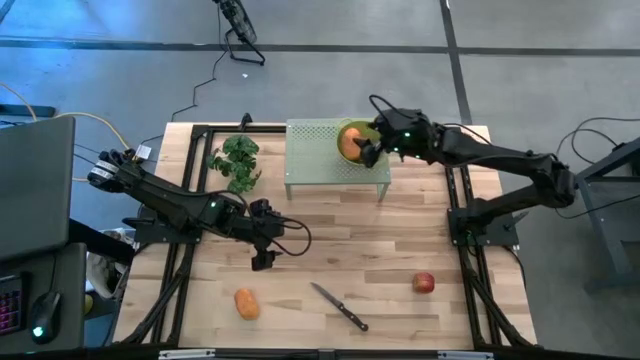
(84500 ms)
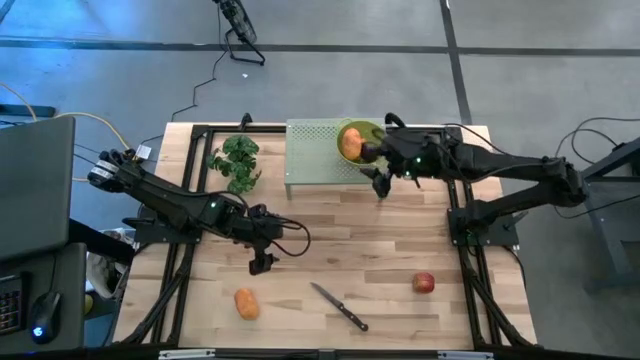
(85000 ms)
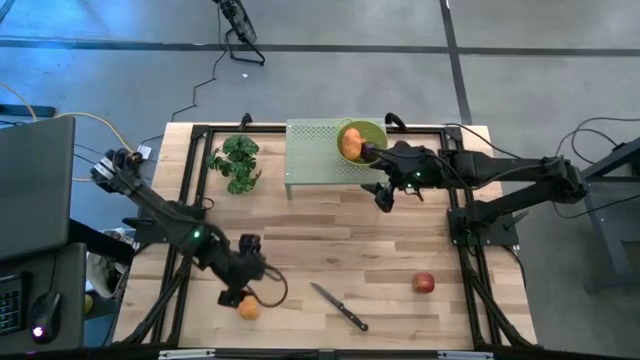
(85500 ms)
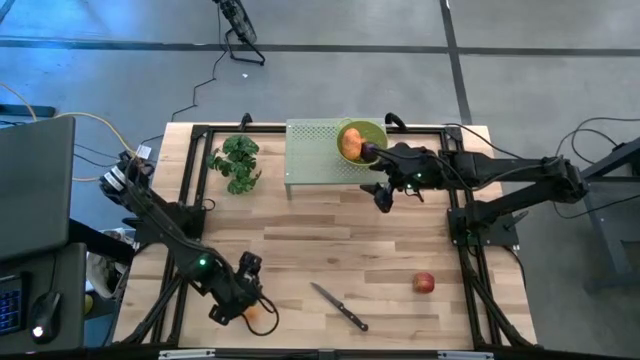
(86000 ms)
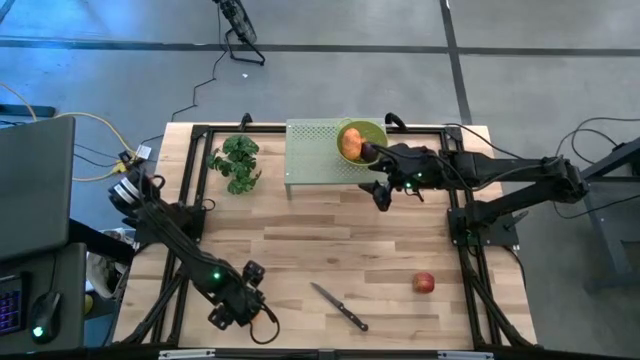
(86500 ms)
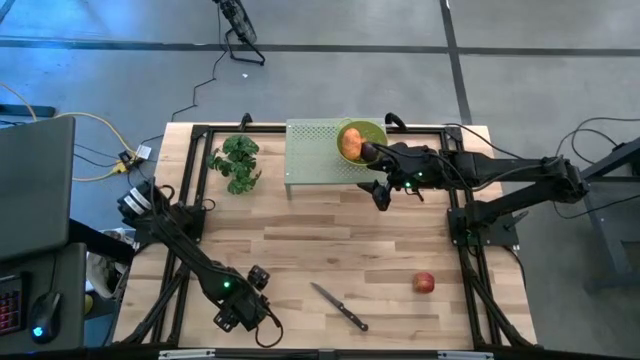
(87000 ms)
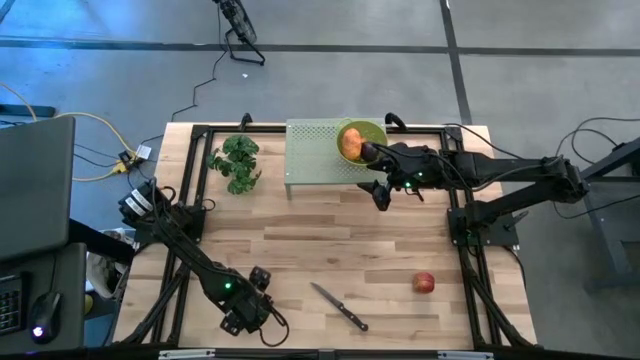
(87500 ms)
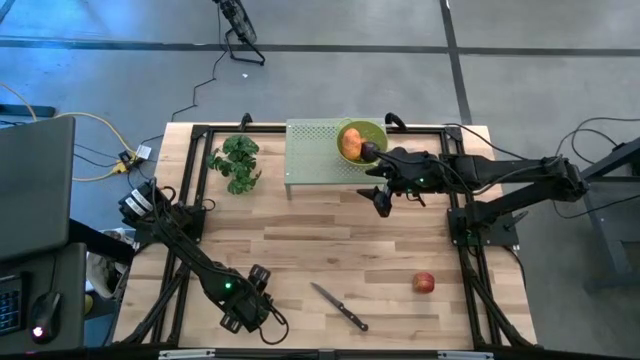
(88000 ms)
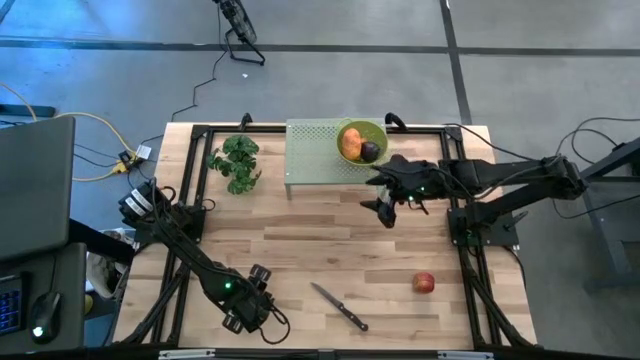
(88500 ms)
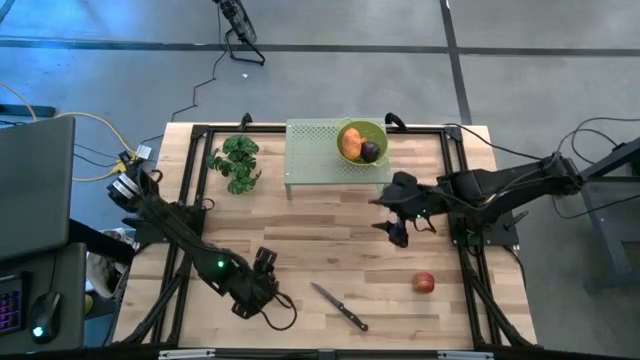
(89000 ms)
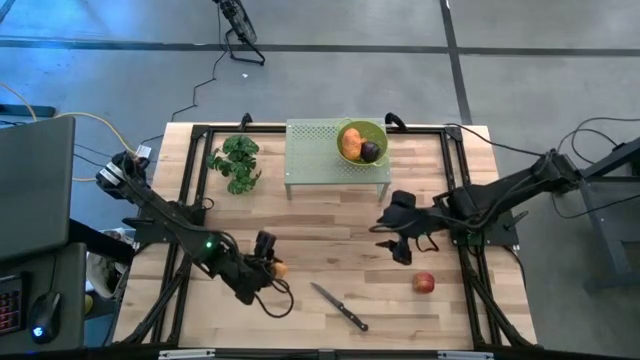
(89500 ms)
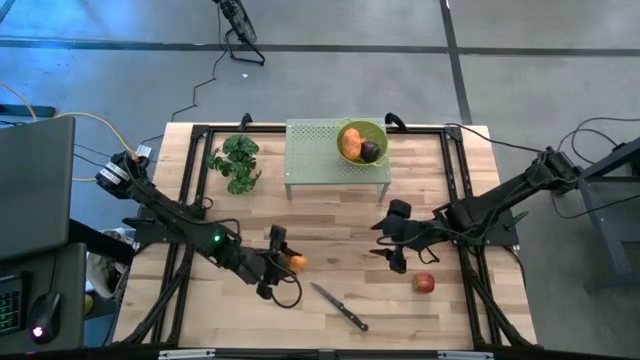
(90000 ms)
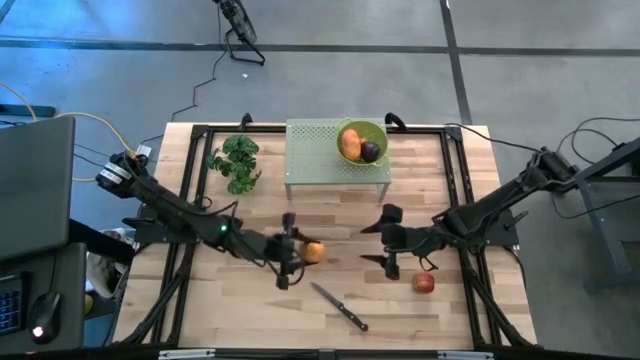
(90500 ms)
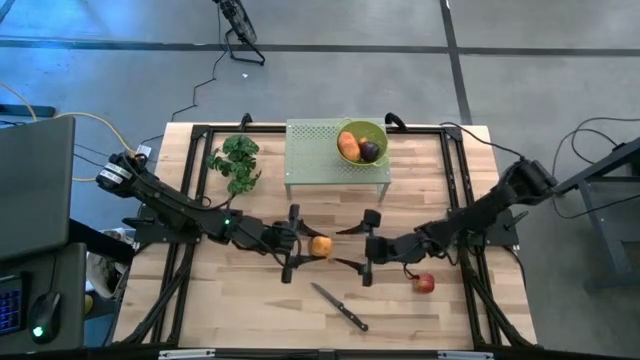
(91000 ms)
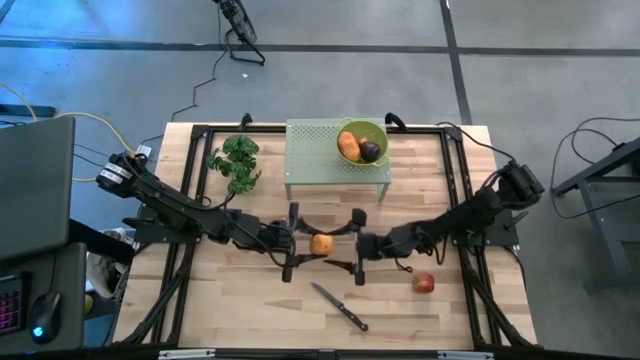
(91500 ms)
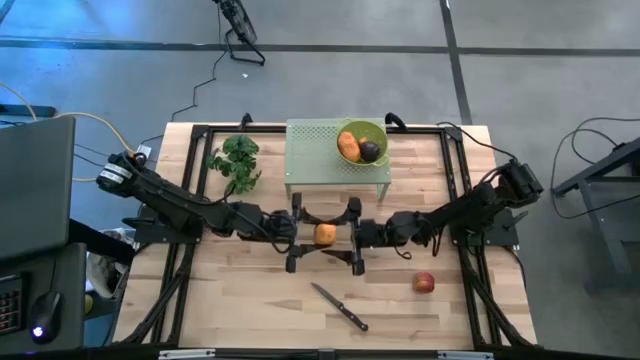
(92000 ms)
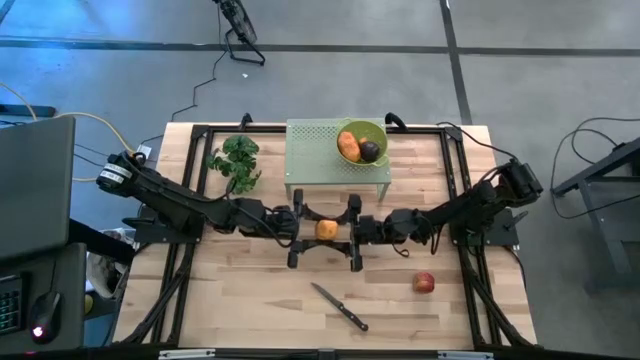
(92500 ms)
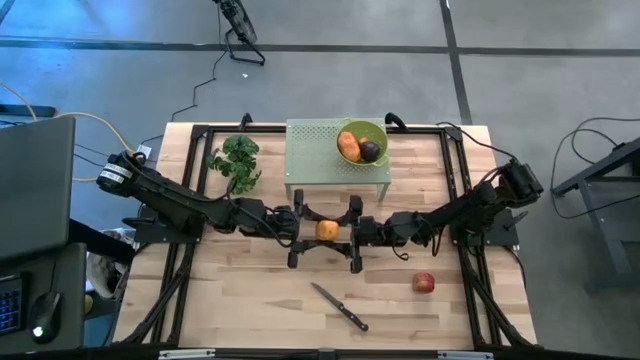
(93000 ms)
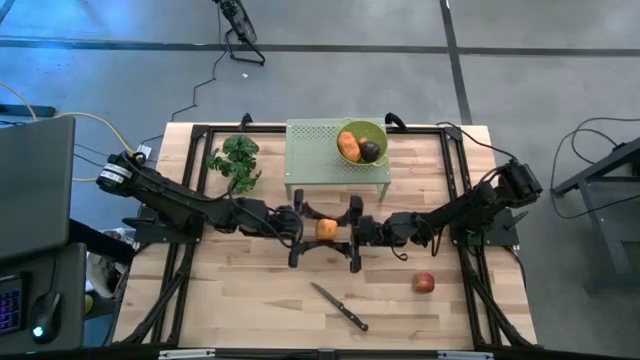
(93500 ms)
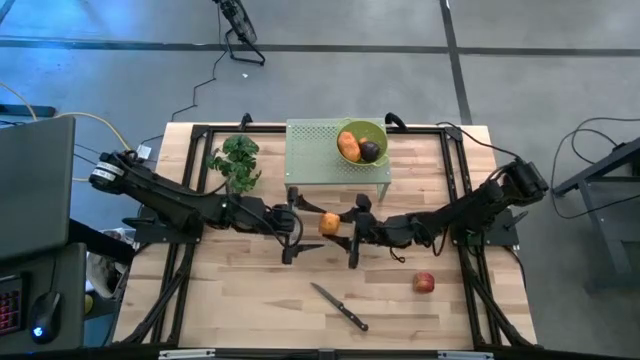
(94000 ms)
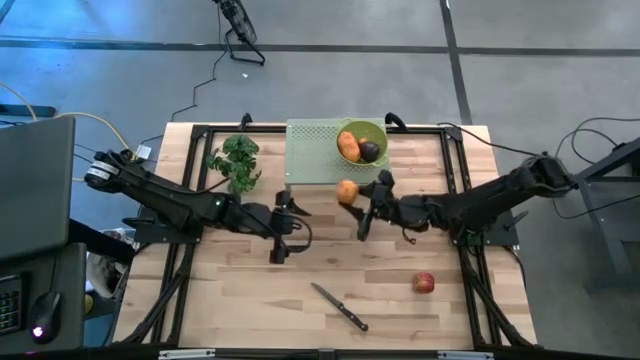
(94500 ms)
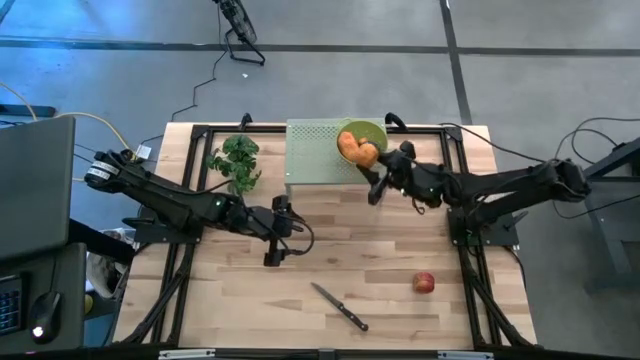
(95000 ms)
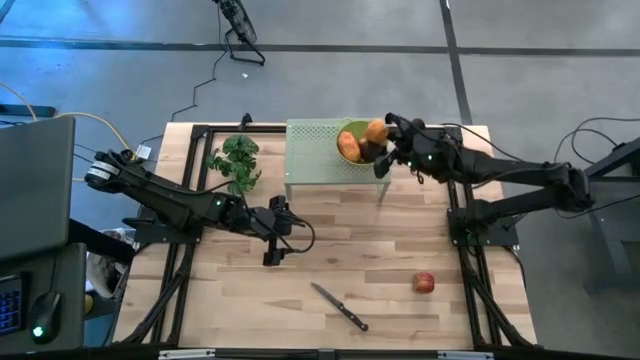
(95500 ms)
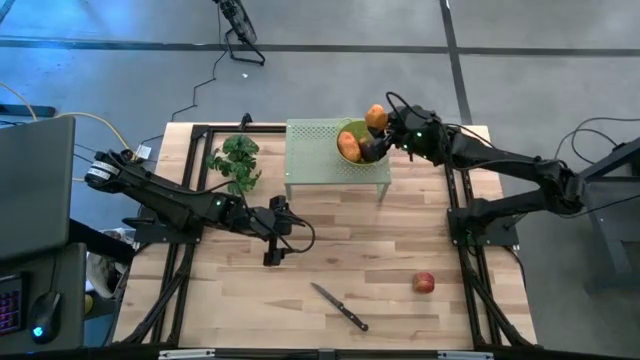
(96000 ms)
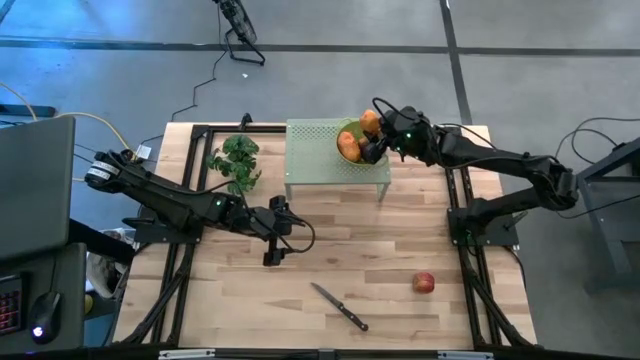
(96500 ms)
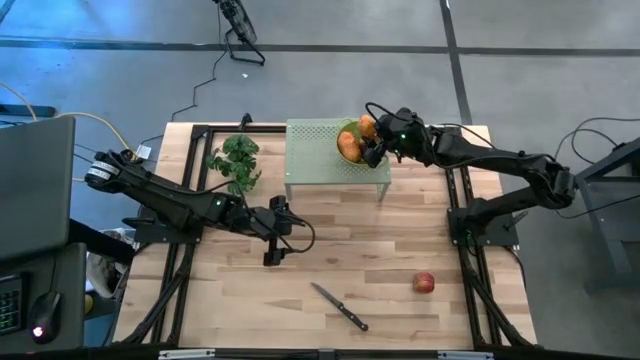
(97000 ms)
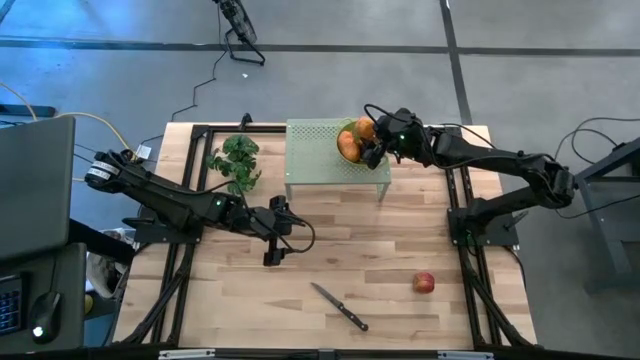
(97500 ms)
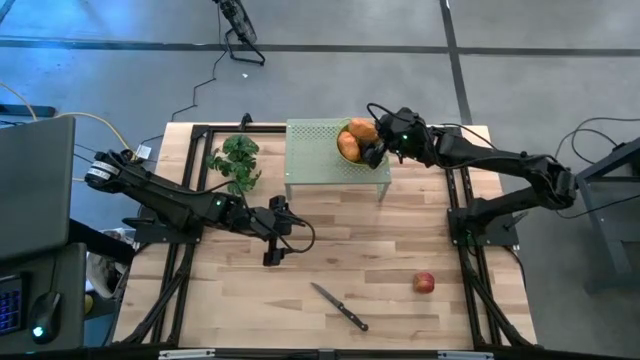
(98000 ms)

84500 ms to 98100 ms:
Task: Pick & Place Fruit
Put the potato into the green strainer bowl on the top shelf

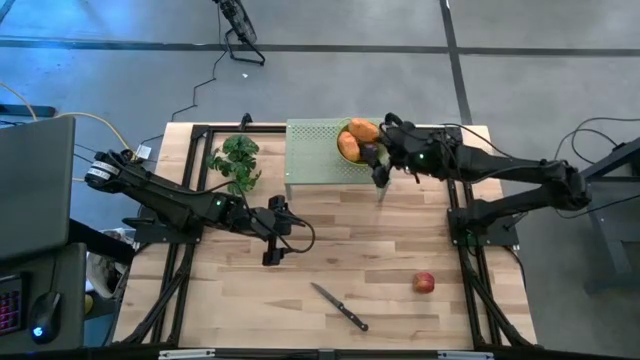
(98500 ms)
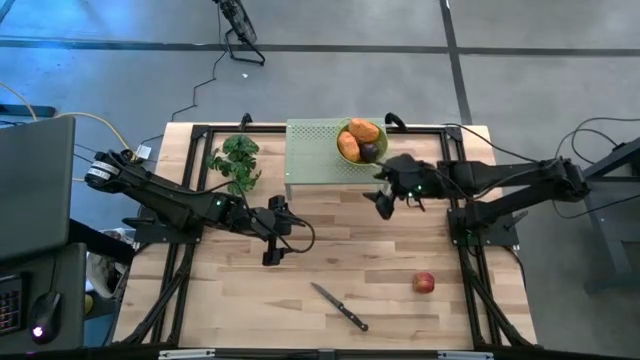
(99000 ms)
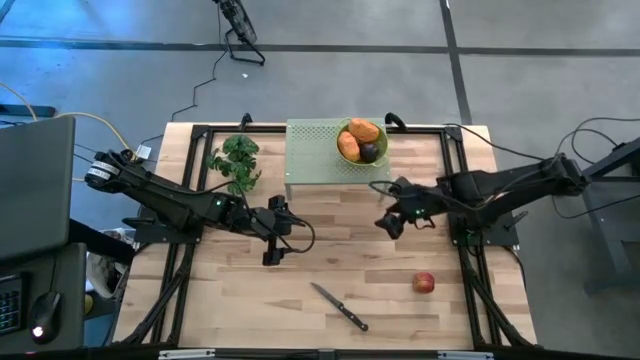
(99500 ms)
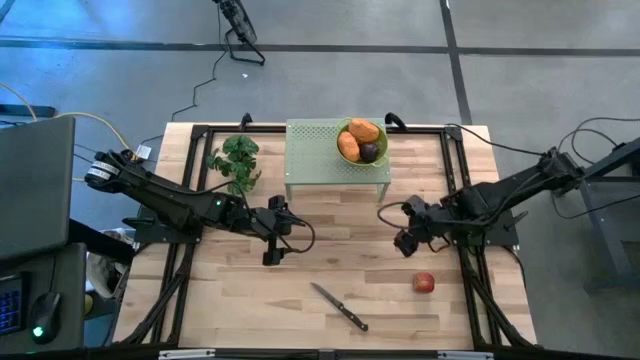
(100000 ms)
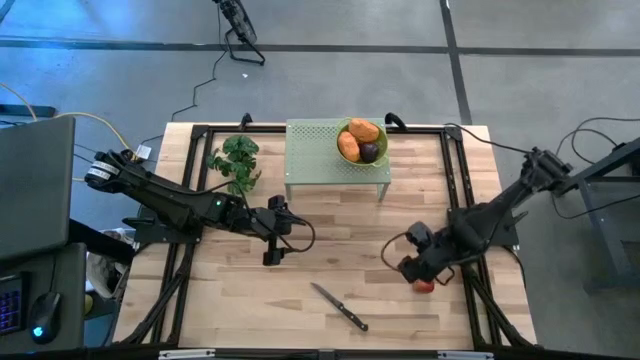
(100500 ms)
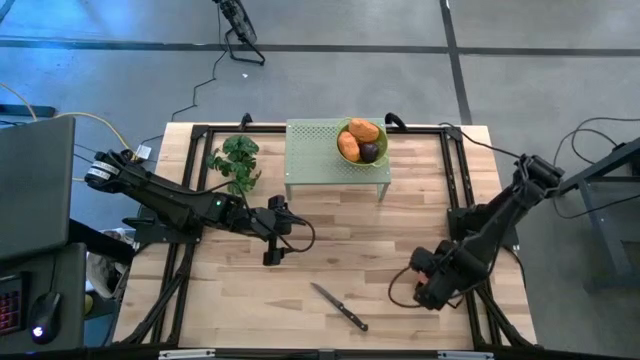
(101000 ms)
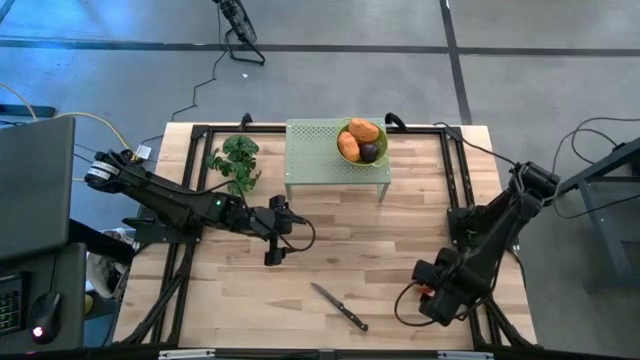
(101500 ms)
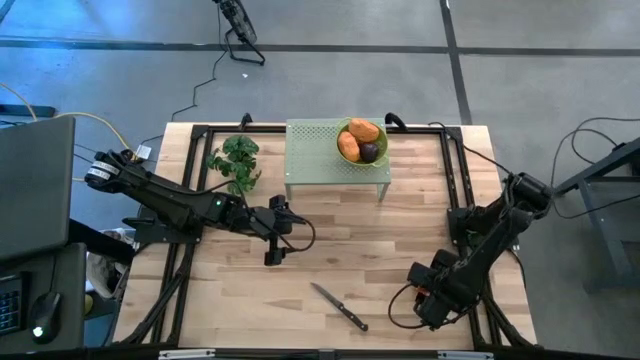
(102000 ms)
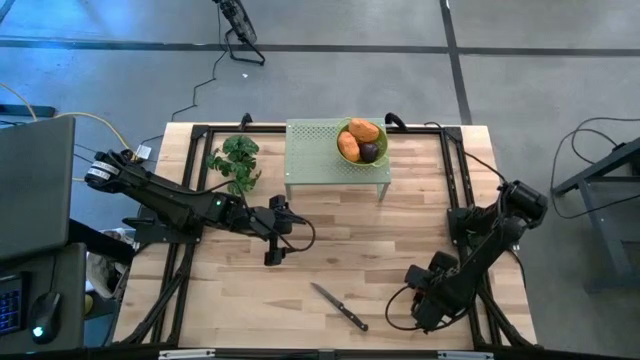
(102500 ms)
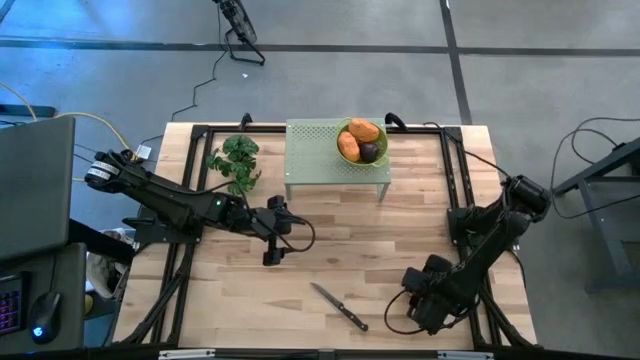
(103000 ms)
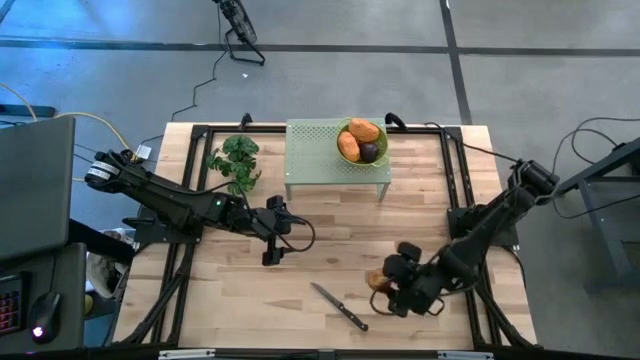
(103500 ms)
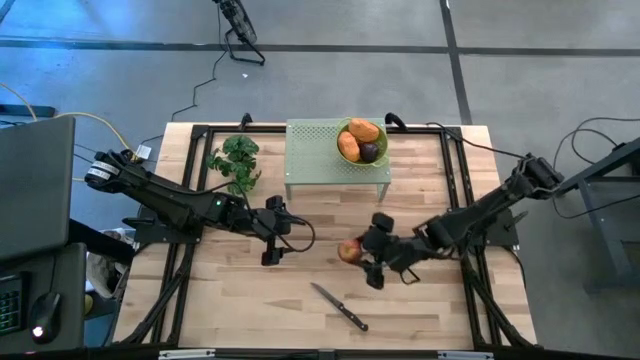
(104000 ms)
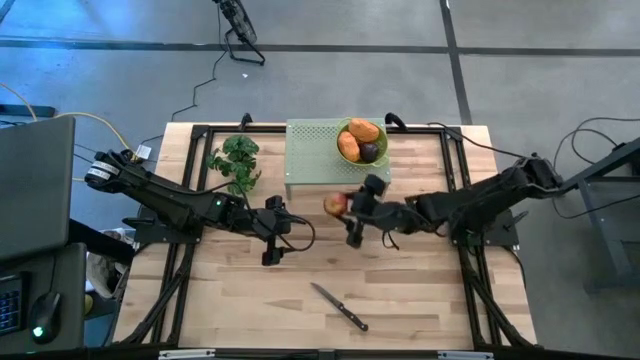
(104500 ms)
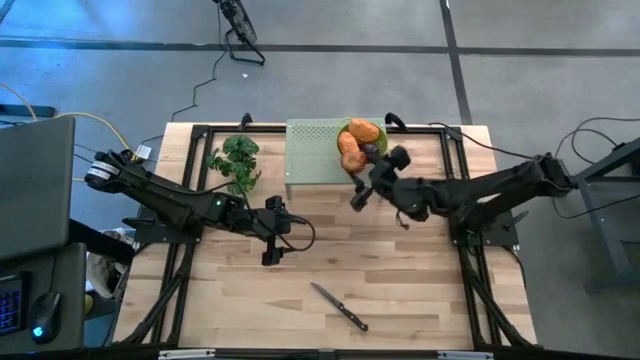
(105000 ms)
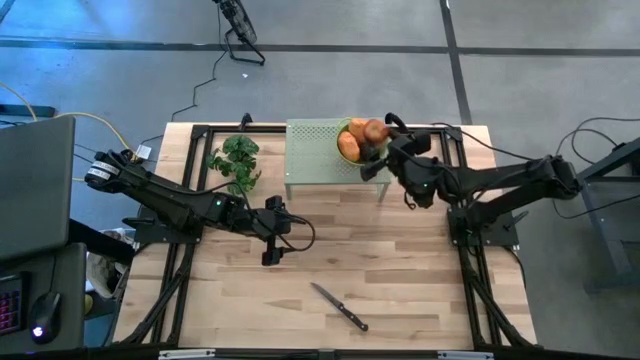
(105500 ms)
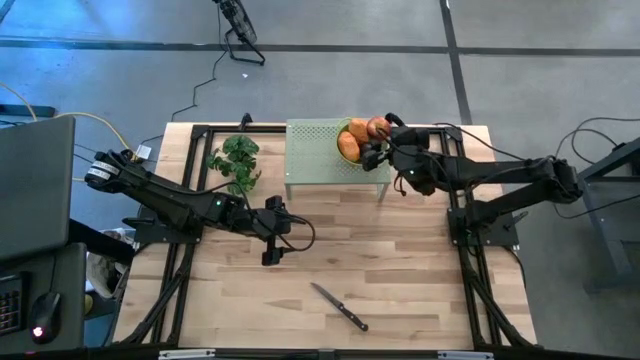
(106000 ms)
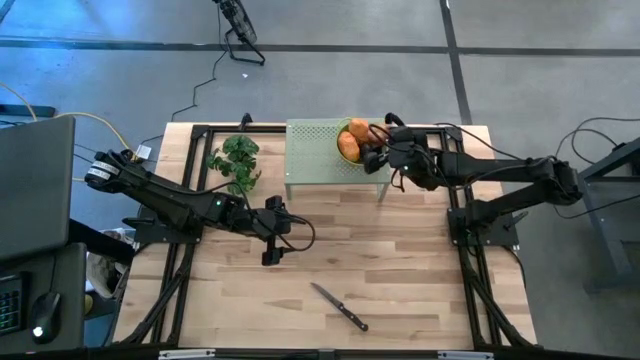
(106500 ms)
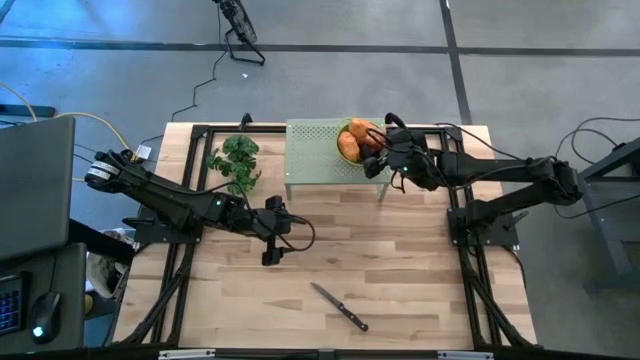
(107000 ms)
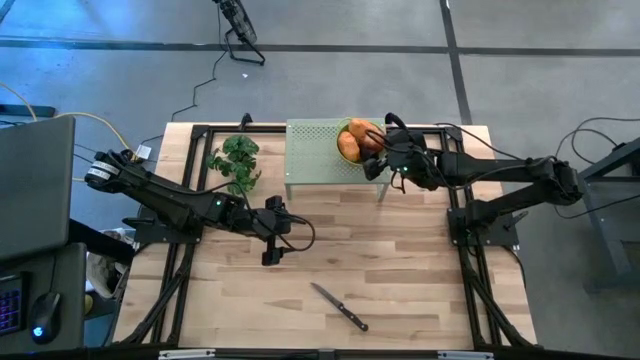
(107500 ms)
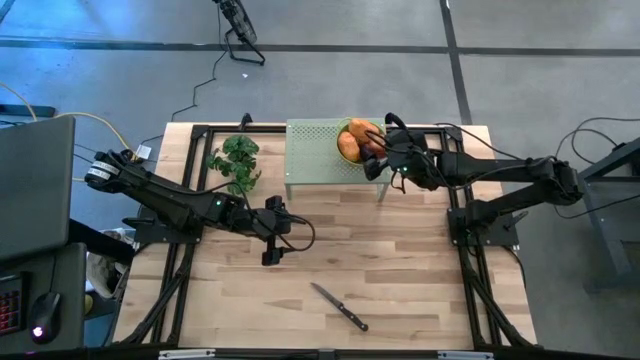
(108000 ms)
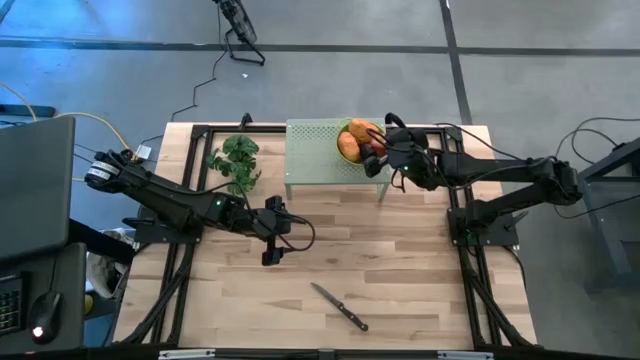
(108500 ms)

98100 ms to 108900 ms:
Put the red apple into the green strainer bowl on the top shelf
